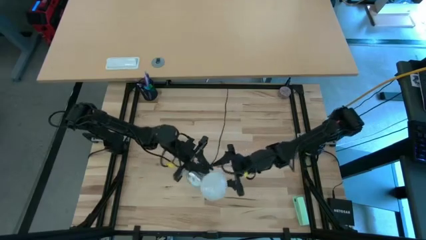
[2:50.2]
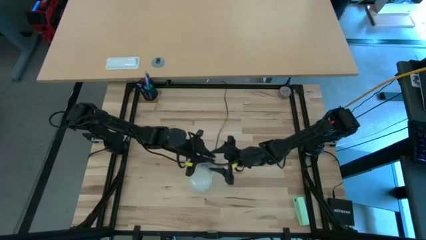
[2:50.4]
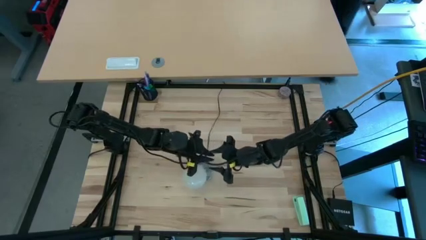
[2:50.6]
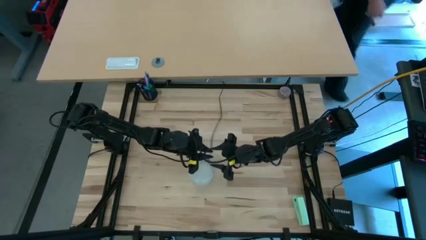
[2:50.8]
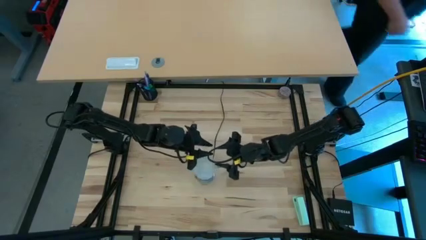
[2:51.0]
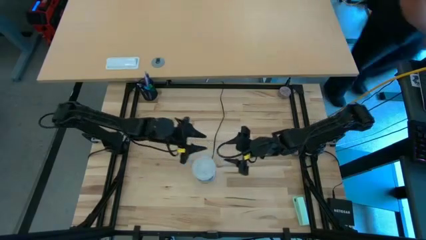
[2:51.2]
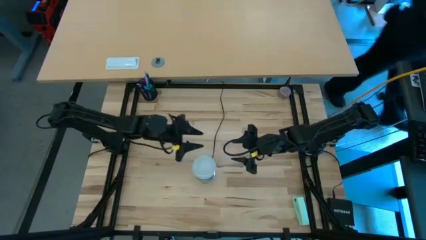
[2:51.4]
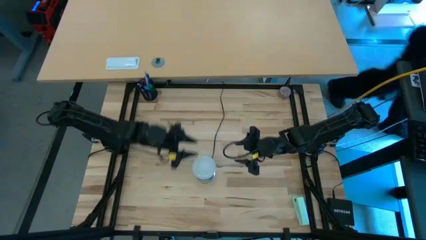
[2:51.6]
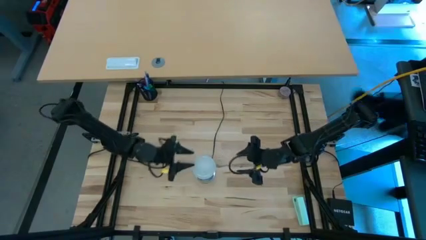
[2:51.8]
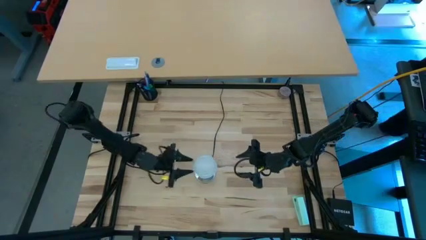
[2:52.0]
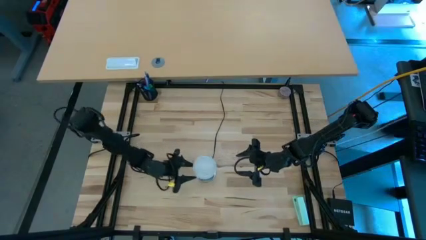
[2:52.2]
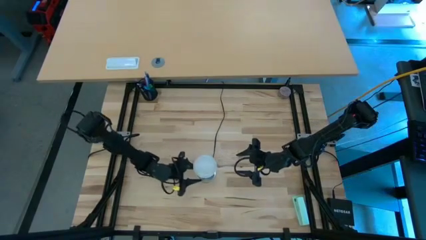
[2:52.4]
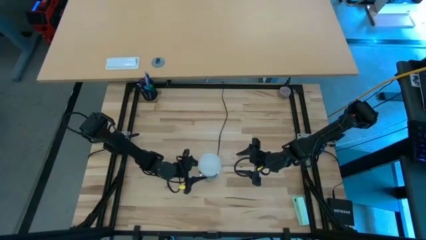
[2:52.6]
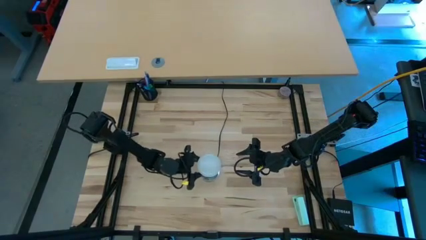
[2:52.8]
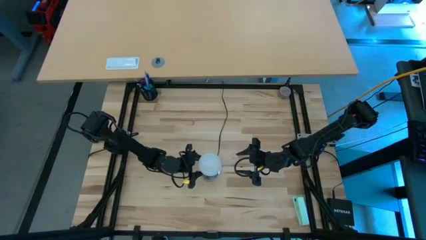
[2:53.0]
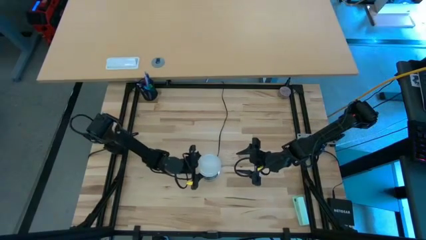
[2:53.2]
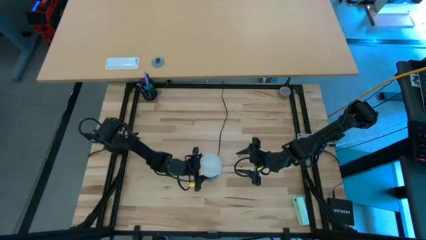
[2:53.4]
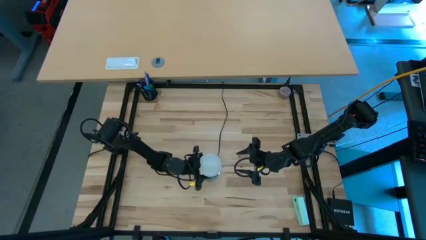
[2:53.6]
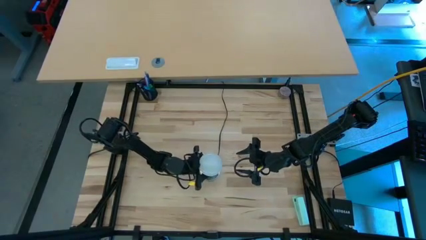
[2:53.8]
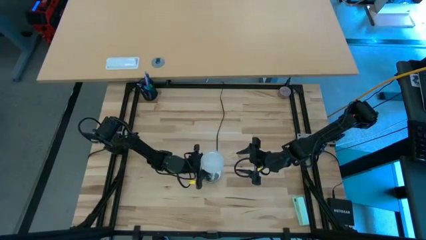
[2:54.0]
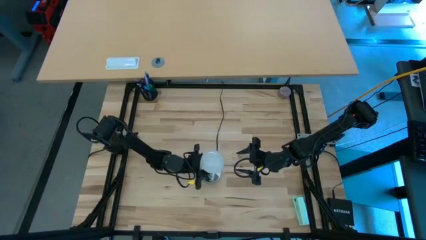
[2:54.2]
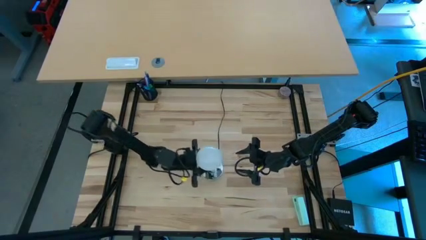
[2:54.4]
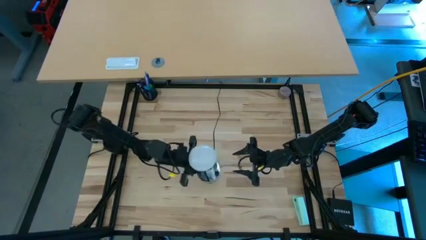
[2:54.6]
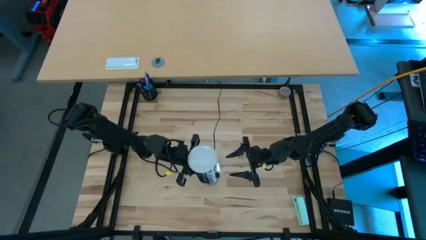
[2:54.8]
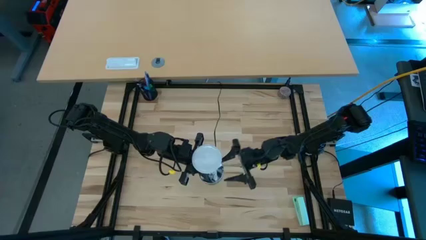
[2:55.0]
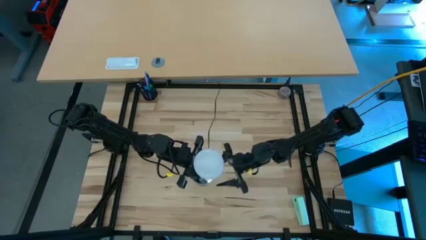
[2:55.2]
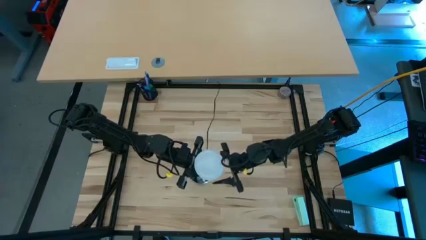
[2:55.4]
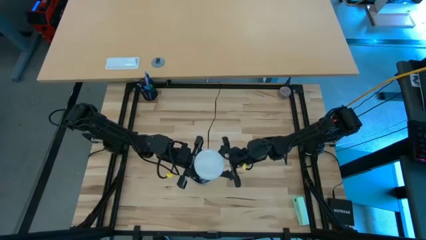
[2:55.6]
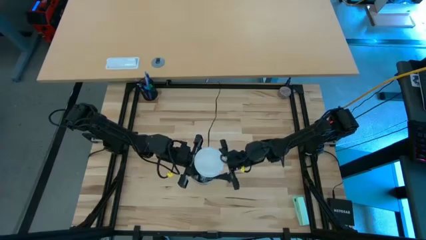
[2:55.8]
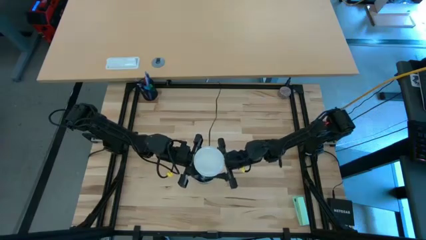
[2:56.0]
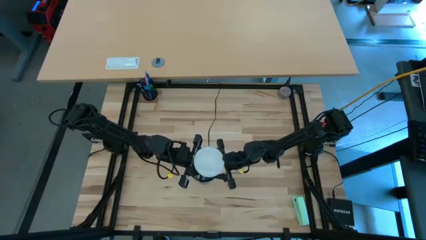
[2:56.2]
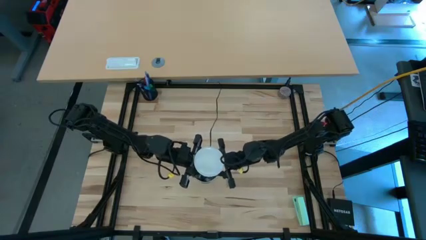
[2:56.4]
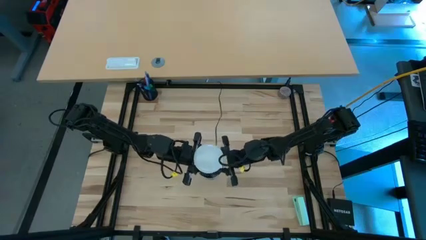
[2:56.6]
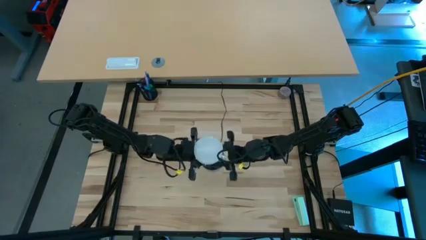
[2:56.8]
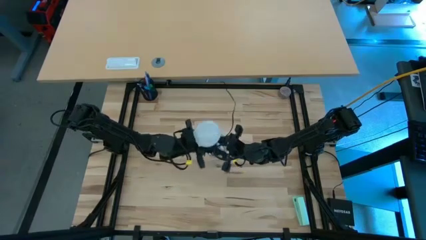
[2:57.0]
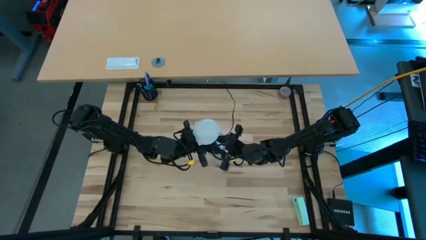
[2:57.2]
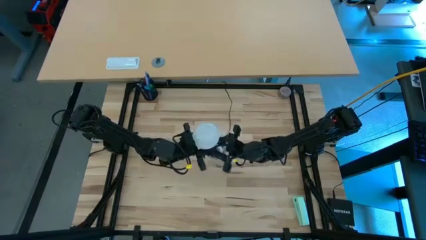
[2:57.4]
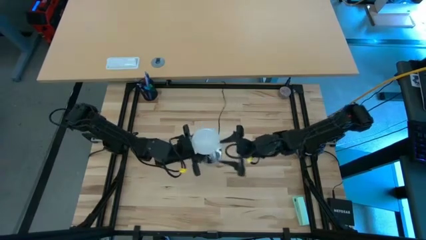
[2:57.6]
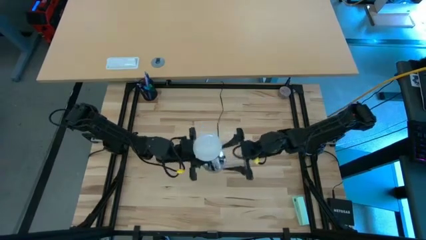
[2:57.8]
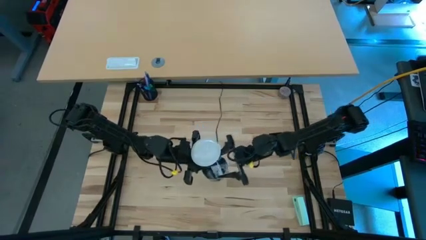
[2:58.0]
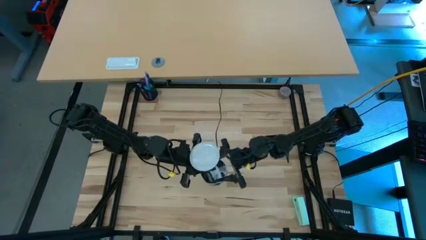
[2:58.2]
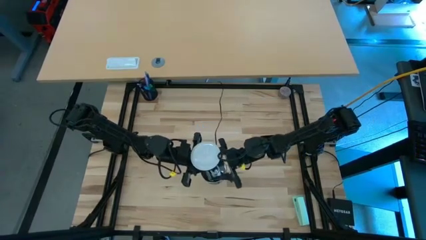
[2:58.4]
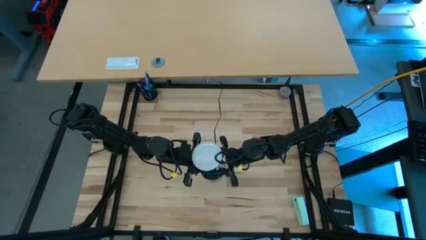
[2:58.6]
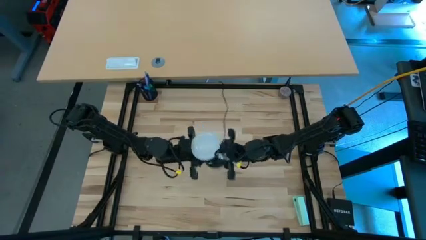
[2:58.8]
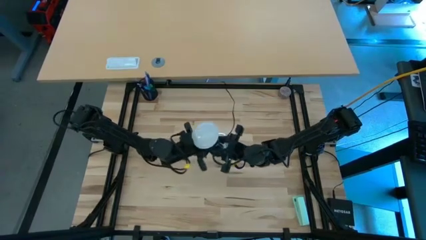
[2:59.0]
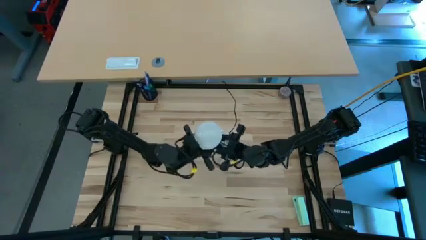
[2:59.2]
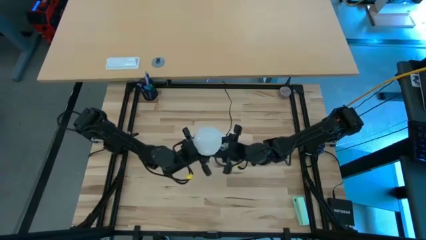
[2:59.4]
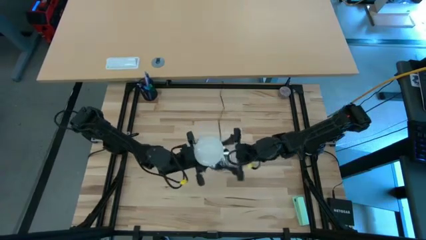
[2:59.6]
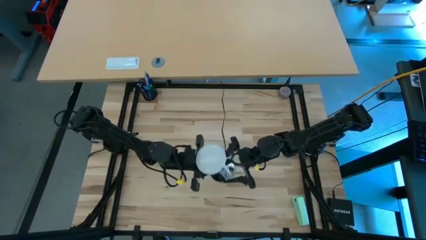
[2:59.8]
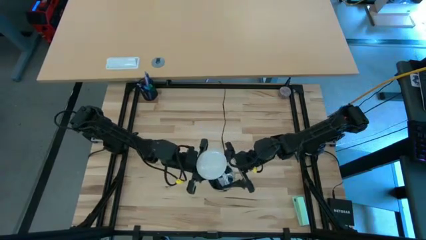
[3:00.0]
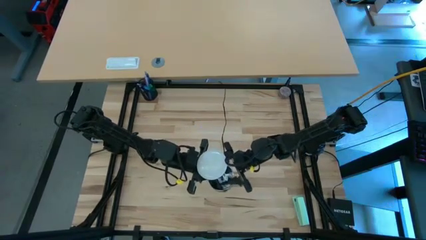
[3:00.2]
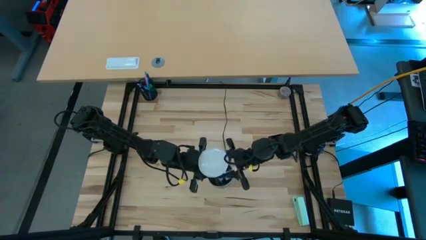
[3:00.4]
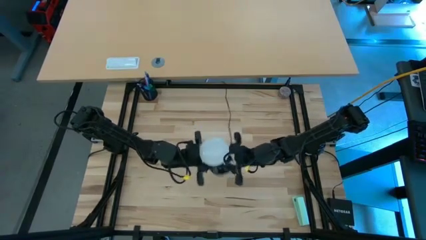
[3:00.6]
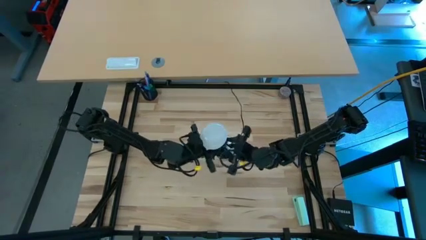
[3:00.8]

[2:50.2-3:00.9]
Task: Screw lightbulb
Remove the lightbulb from the lamp
